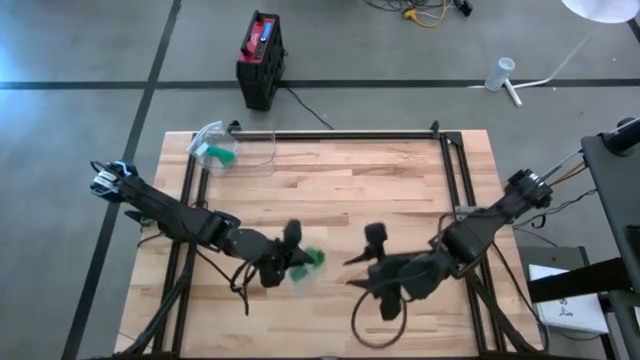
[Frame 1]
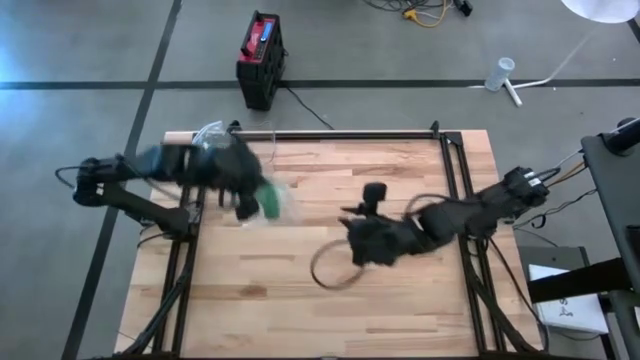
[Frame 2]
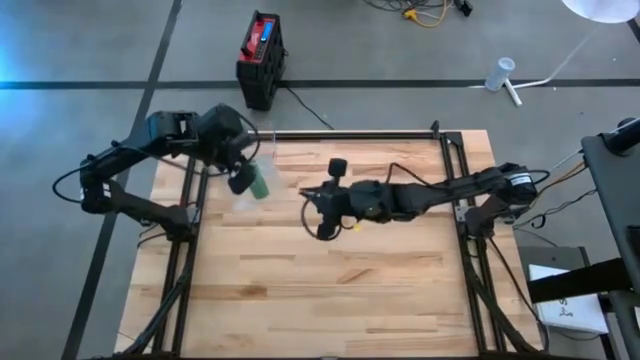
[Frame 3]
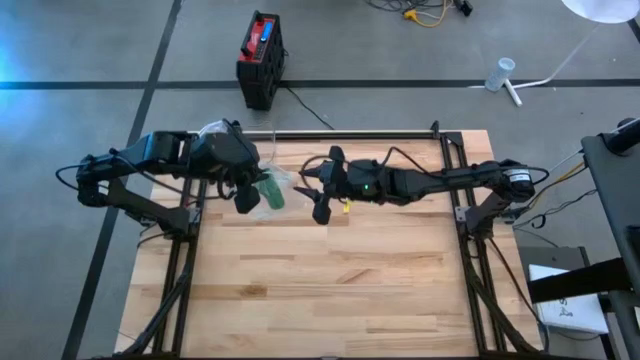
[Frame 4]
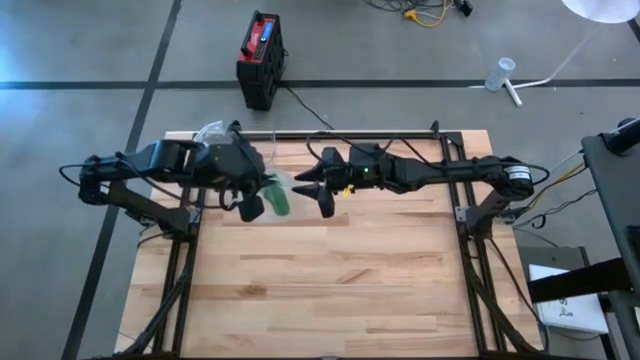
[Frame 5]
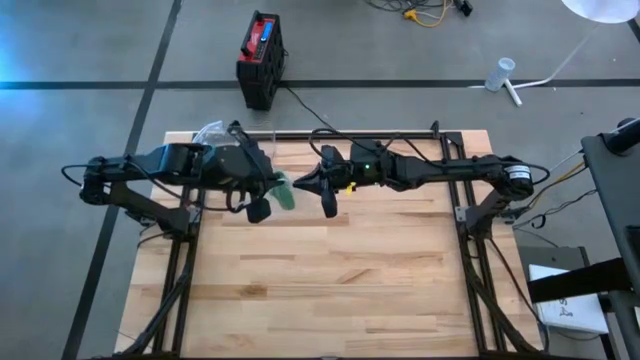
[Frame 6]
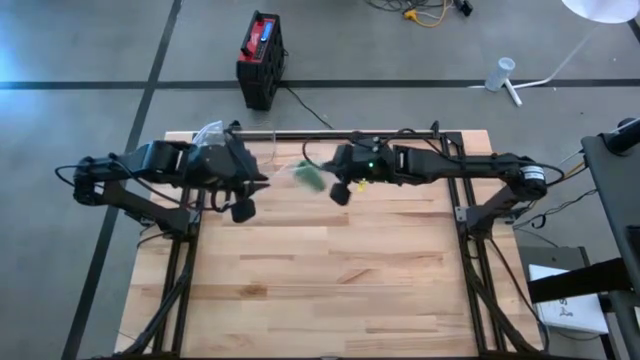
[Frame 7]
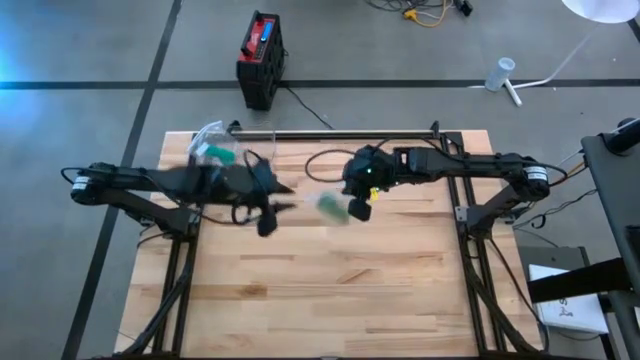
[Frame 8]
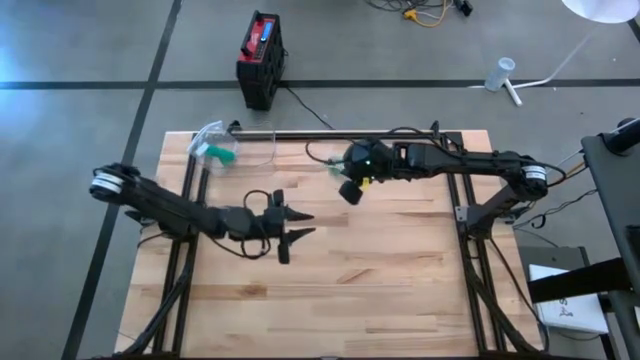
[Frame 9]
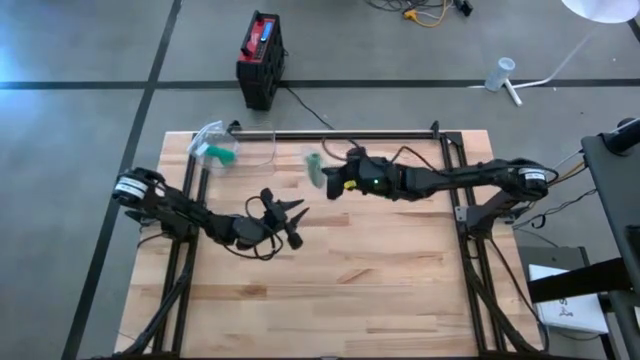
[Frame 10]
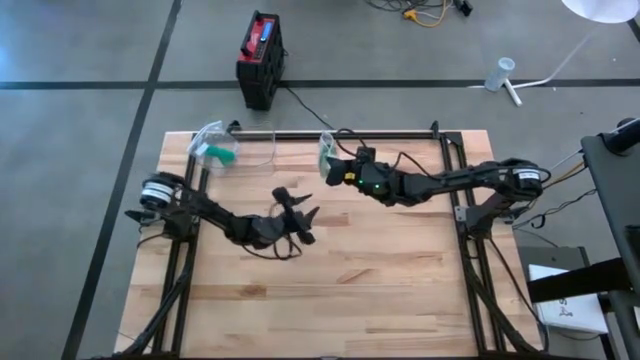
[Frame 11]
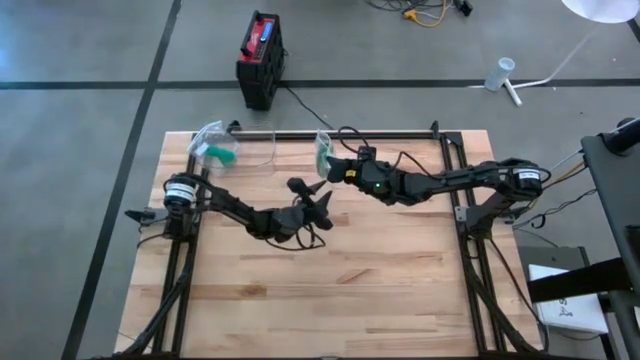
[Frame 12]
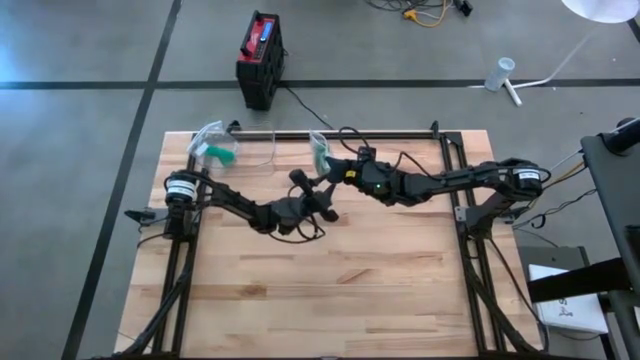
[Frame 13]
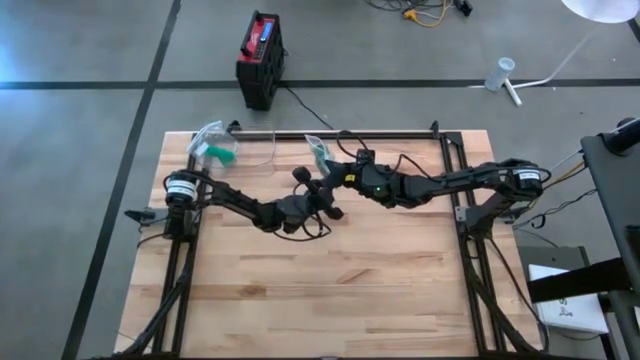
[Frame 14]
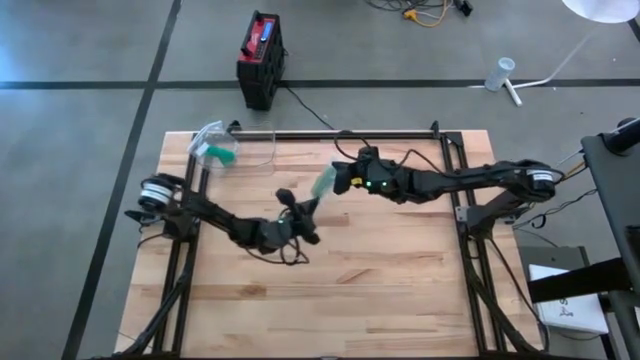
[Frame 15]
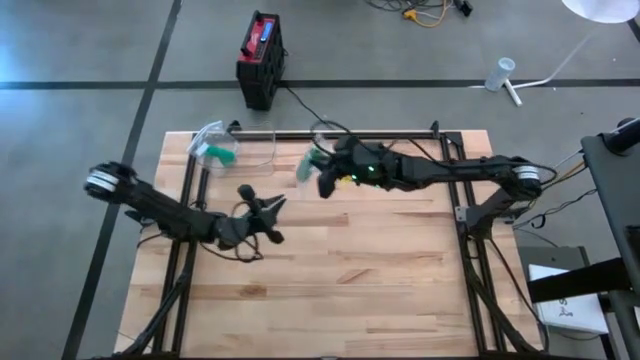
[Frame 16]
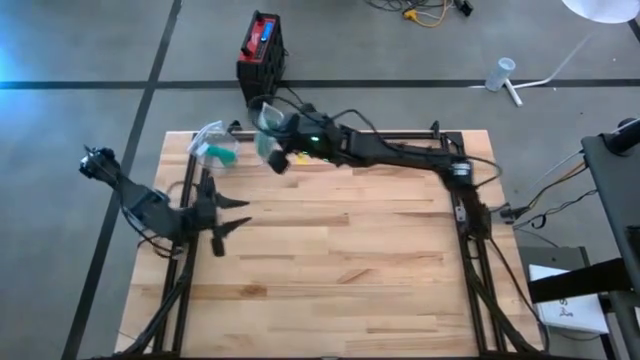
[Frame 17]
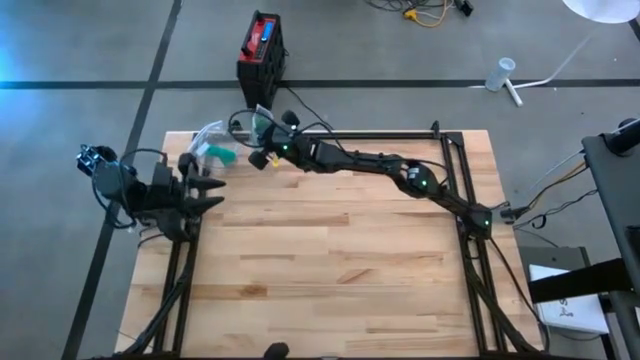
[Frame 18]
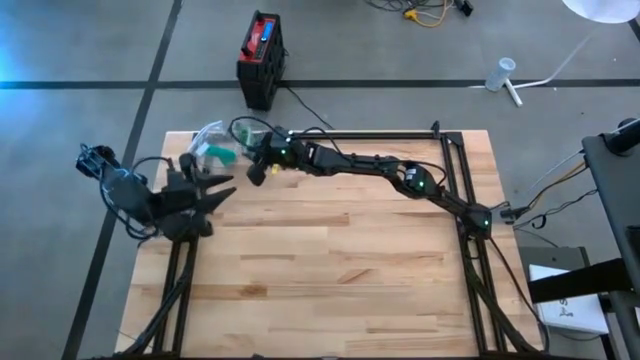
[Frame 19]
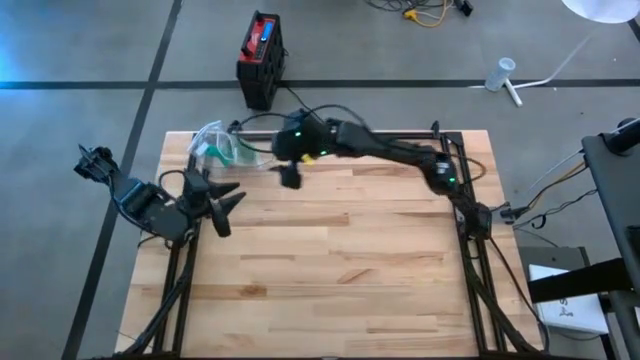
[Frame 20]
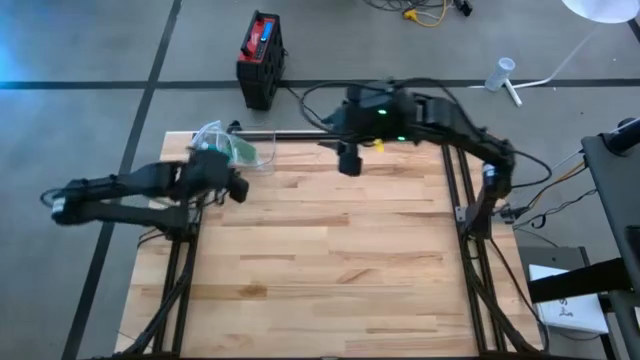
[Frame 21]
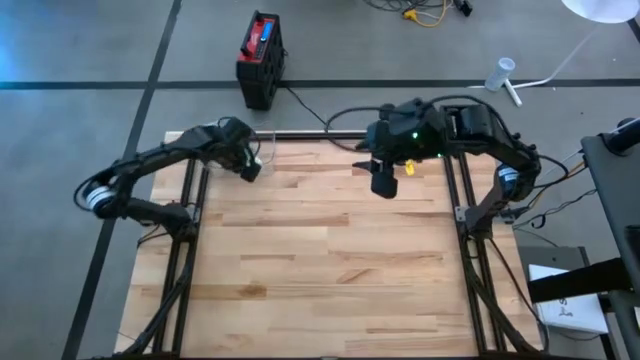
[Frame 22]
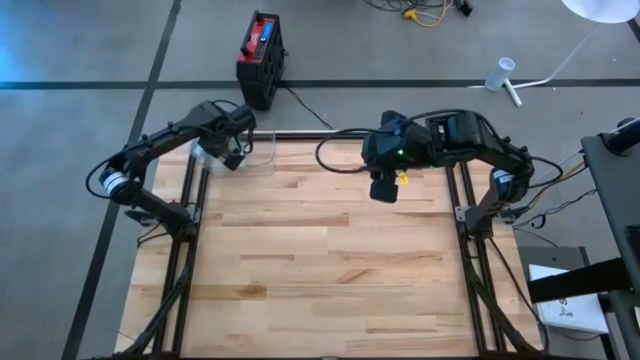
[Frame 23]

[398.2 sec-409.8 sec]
Task: Roll bandage
Put the green rolled bandage package into the transparent bin

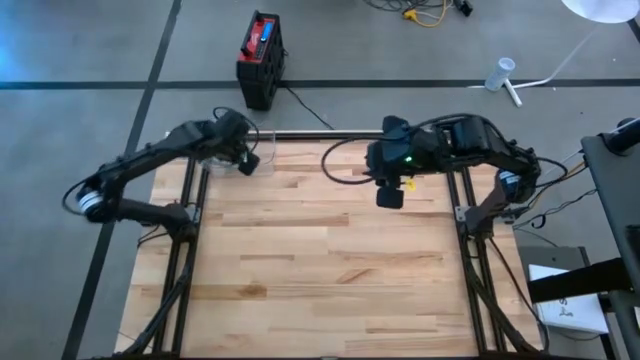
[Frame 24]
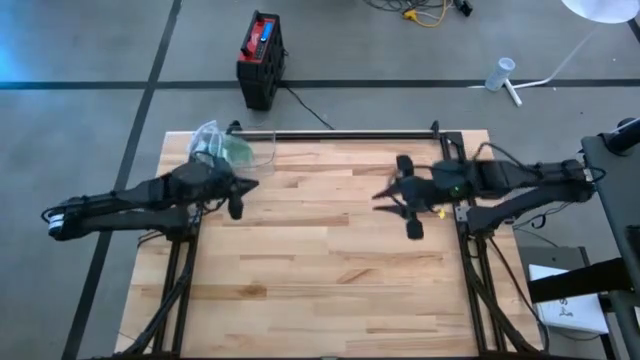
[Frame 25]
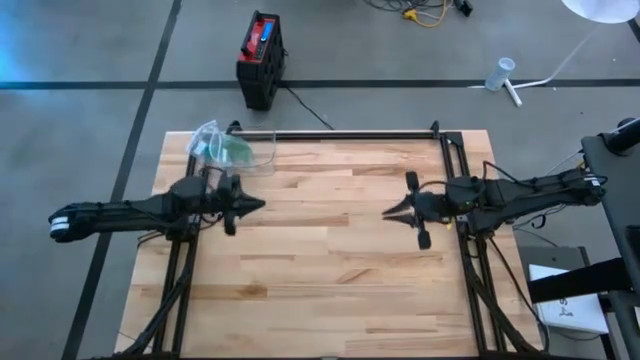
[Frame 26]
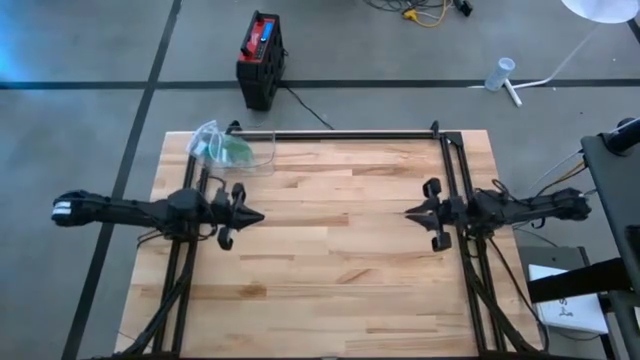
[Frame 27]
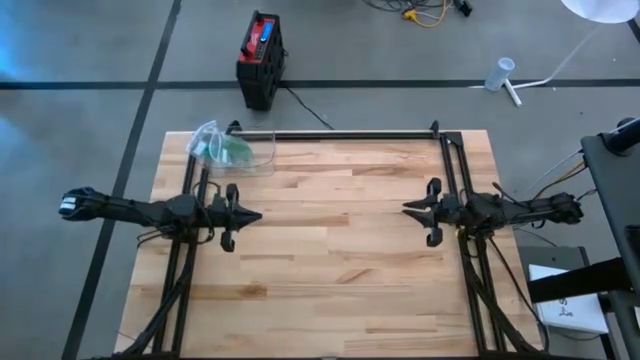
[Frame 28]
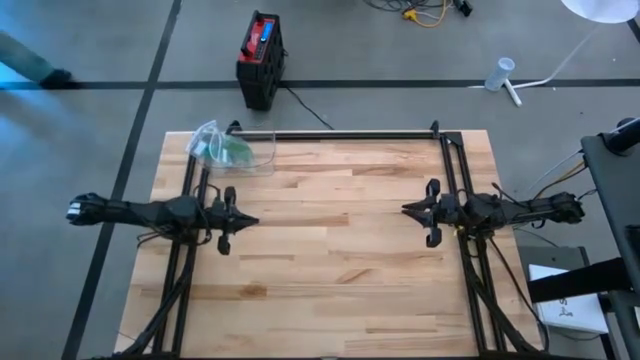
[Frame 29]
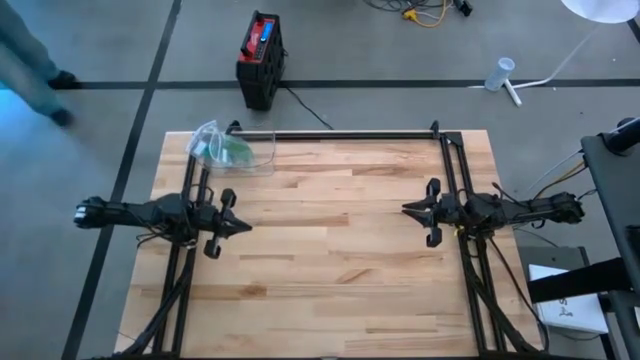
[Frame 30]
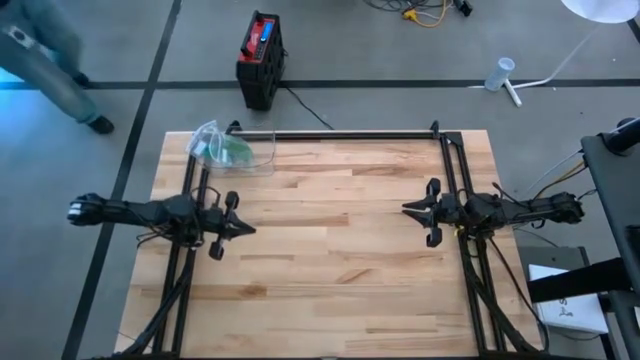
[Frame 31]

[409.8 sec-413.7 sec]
Return to Home Position

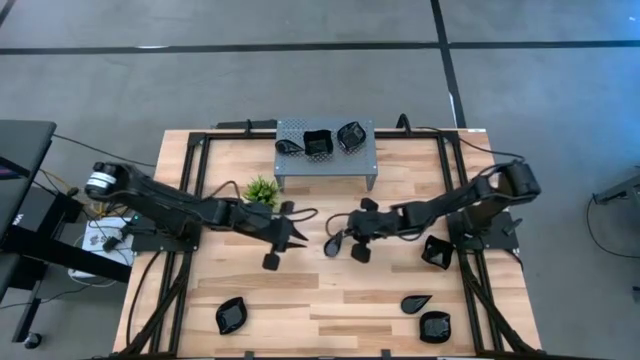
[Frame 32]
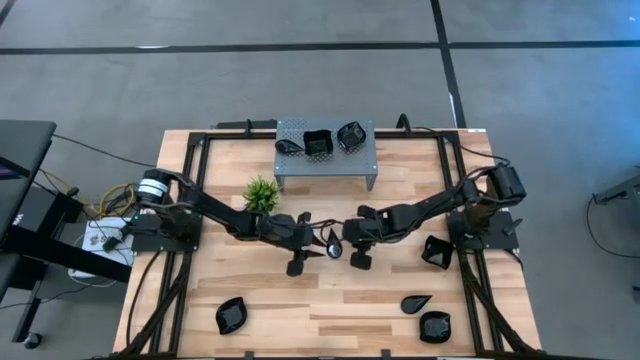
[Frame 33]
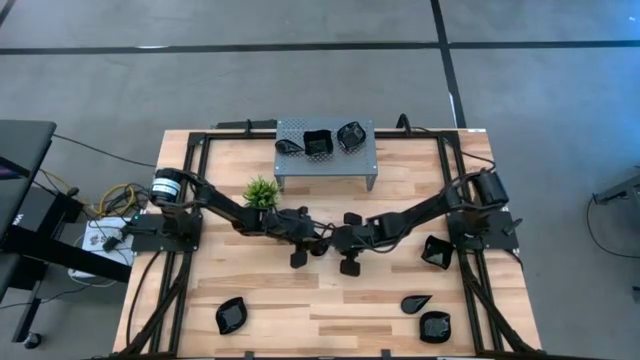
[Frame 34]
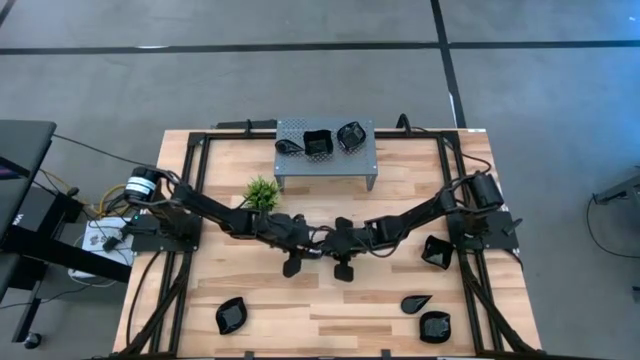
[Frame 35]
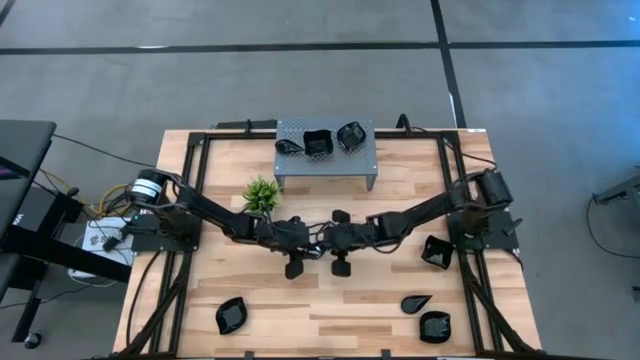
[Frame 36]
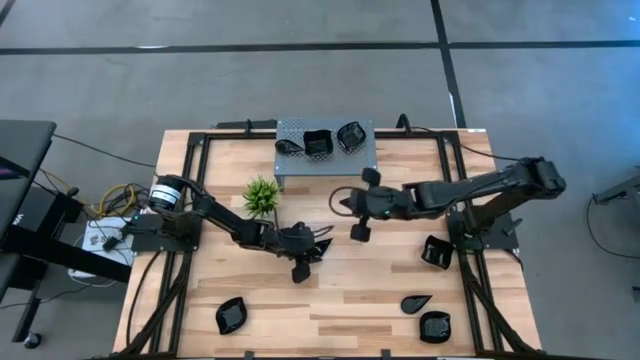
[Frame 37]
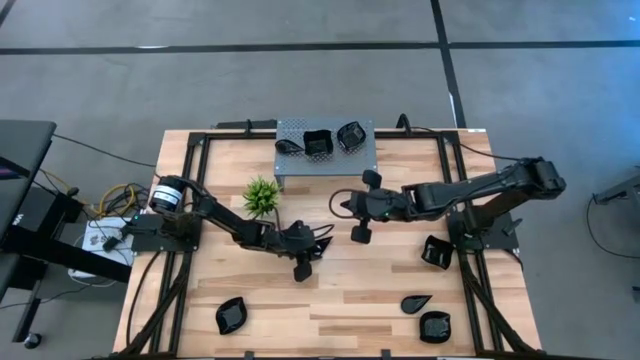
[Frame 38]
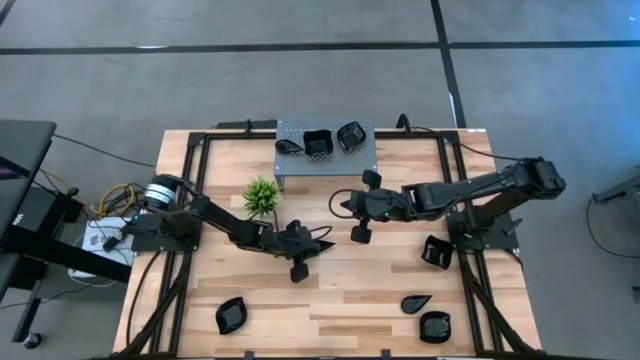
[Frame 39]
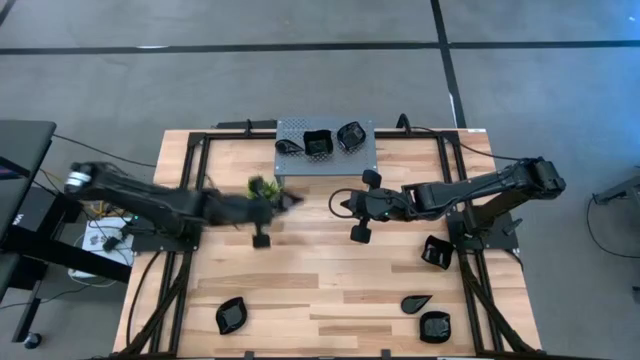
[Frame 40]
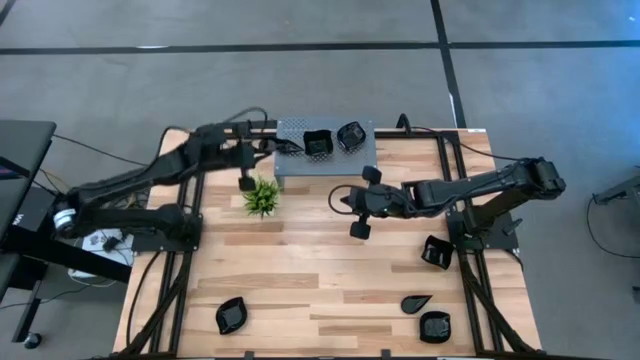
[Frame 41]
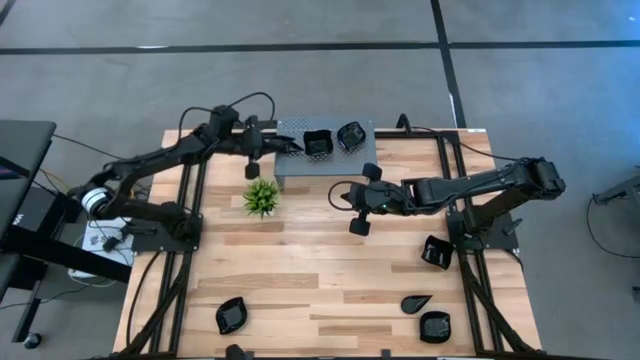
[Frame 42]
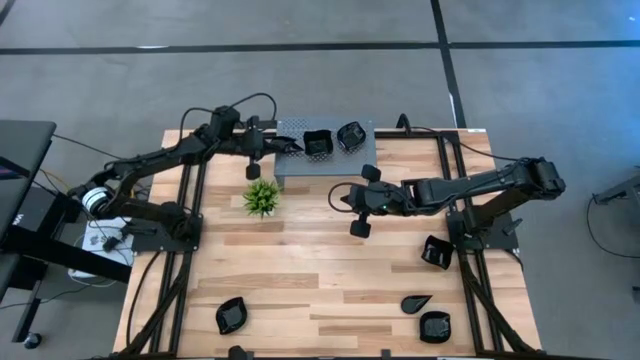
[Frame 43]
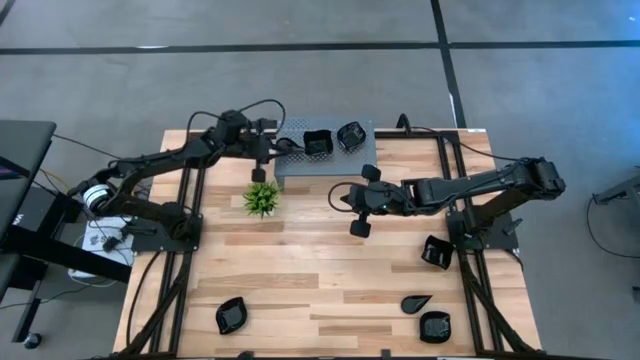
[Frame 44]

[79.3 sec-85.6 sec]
Task: Pick & Place Mini shaped plates
Stack the black drop-shaped plate on top of the black drop-shaped plate on the shelf
